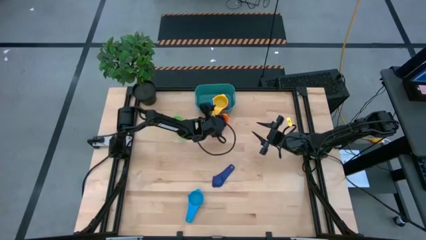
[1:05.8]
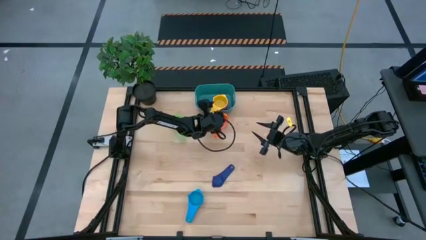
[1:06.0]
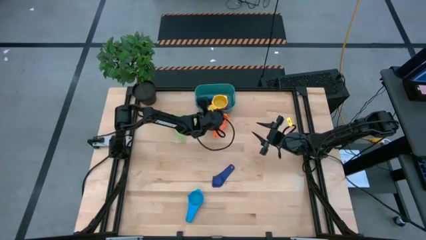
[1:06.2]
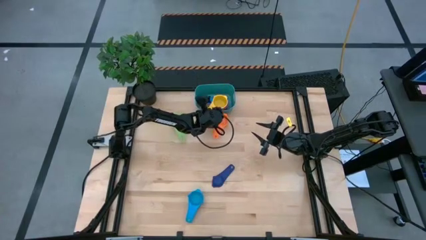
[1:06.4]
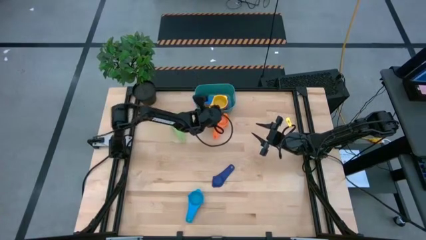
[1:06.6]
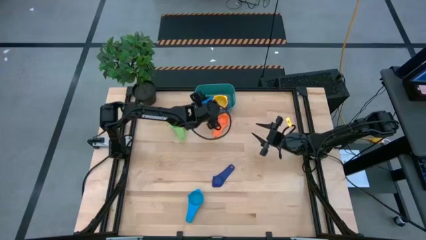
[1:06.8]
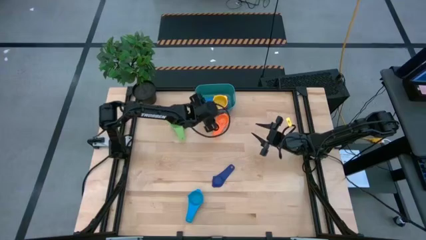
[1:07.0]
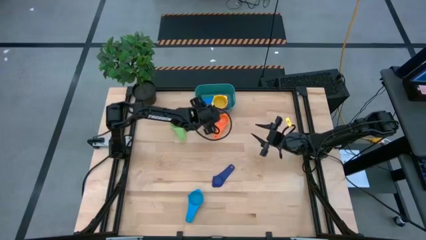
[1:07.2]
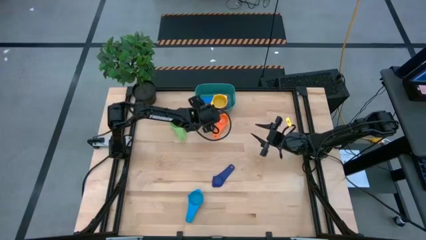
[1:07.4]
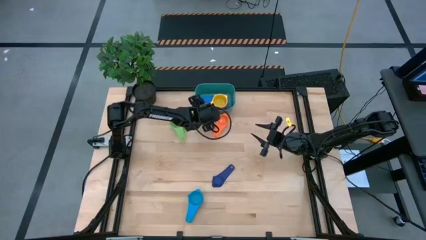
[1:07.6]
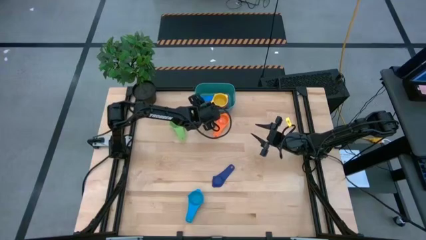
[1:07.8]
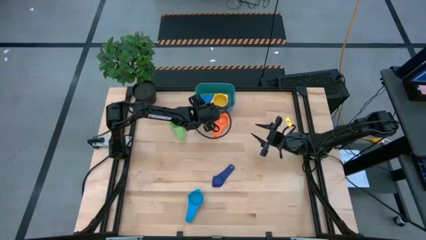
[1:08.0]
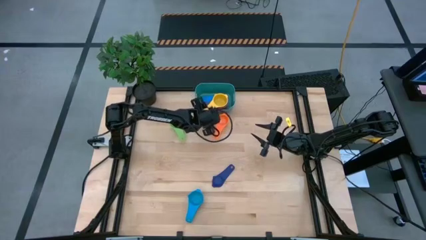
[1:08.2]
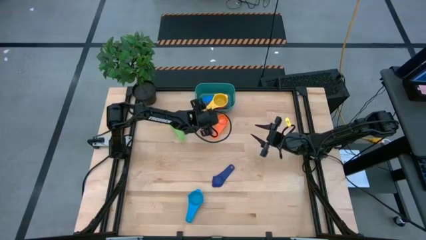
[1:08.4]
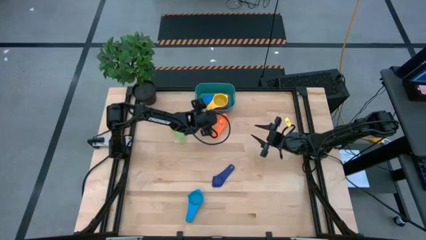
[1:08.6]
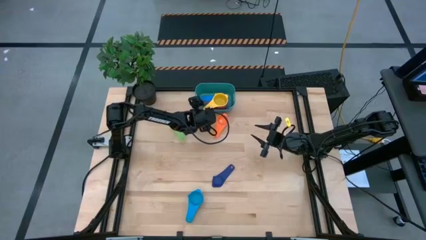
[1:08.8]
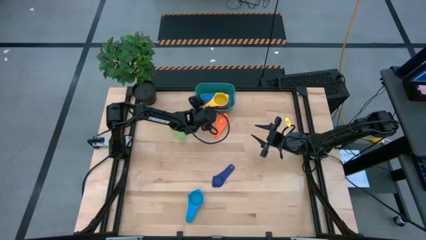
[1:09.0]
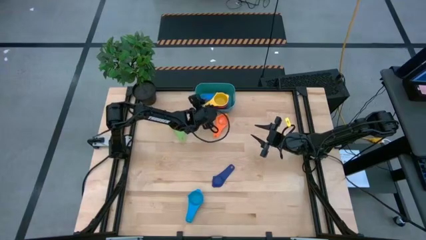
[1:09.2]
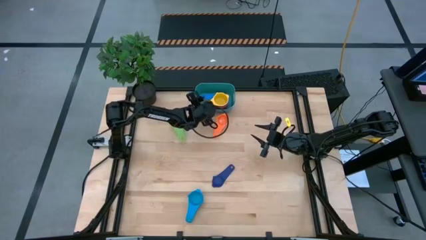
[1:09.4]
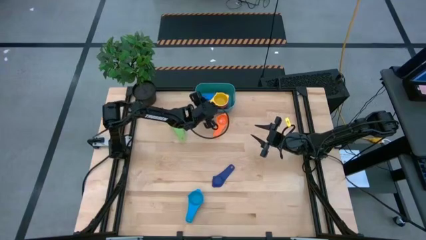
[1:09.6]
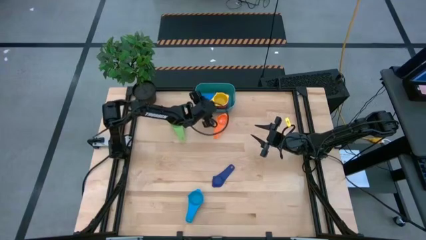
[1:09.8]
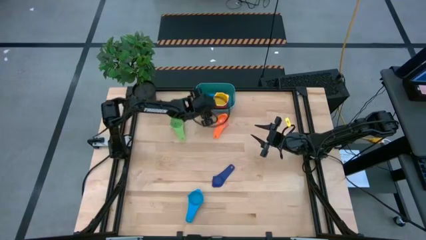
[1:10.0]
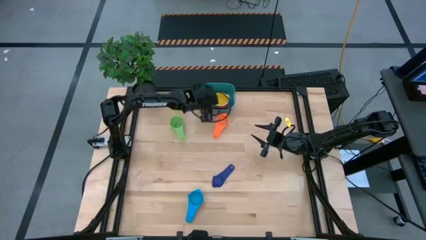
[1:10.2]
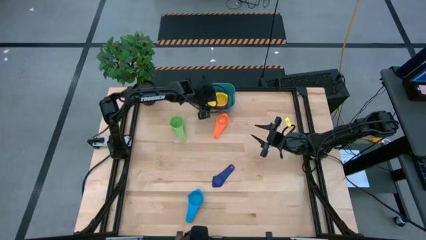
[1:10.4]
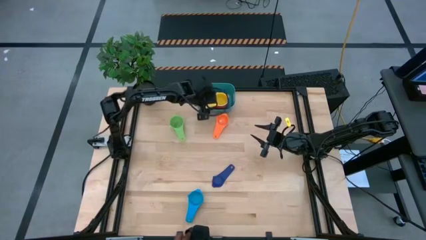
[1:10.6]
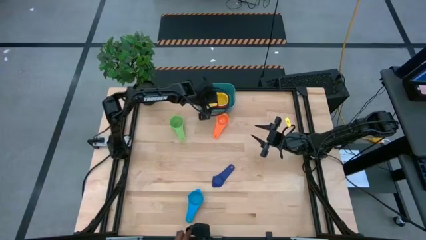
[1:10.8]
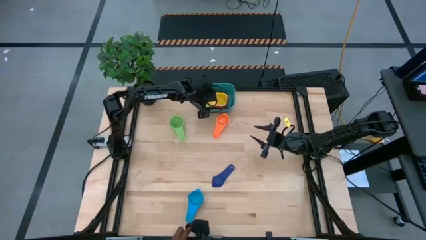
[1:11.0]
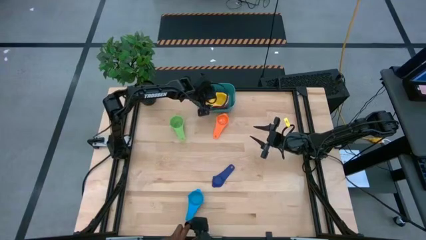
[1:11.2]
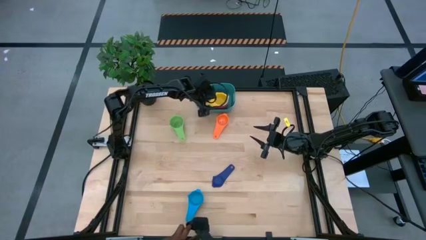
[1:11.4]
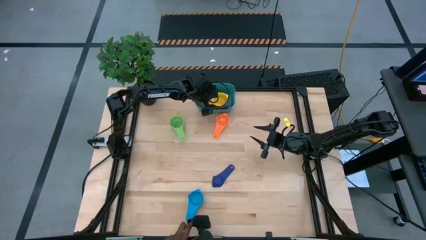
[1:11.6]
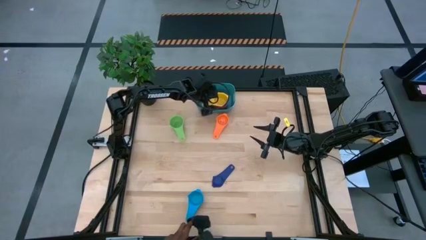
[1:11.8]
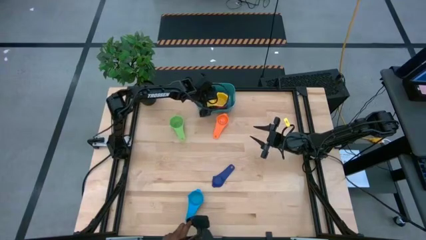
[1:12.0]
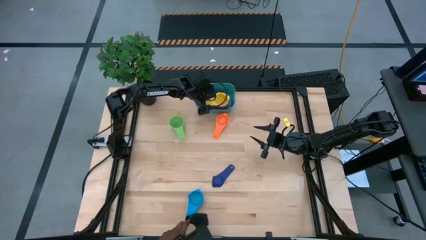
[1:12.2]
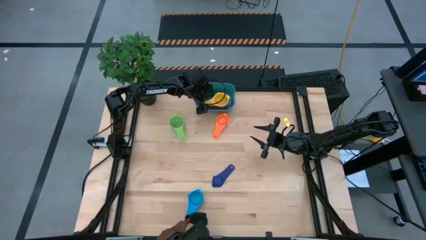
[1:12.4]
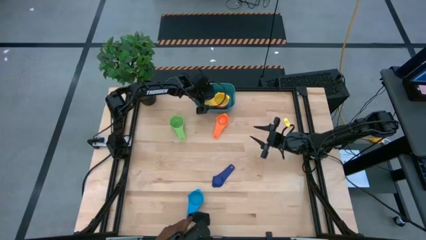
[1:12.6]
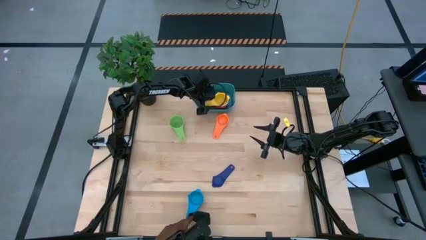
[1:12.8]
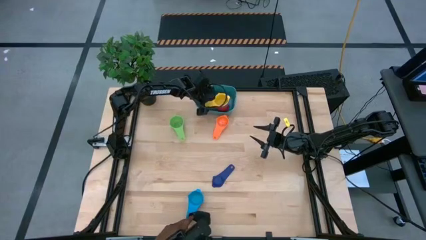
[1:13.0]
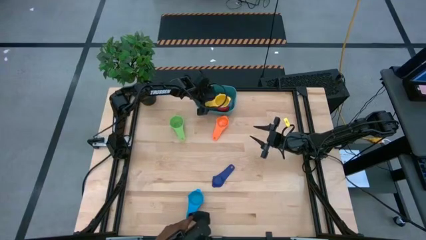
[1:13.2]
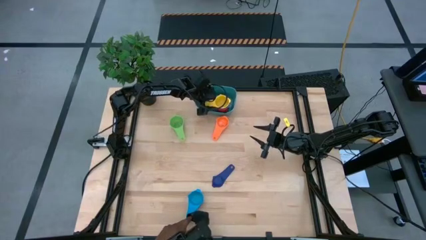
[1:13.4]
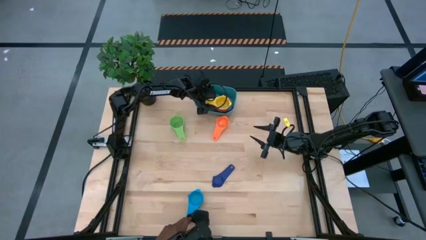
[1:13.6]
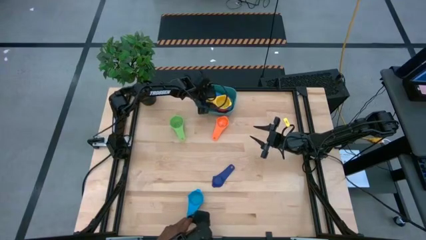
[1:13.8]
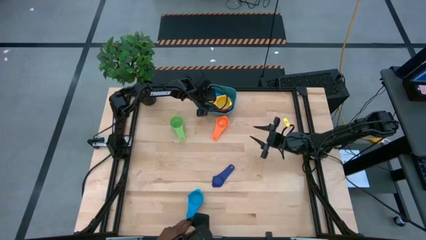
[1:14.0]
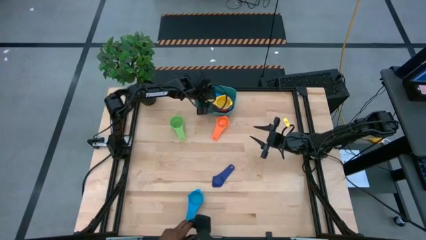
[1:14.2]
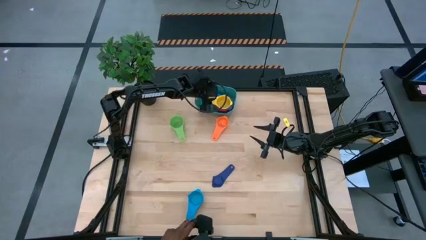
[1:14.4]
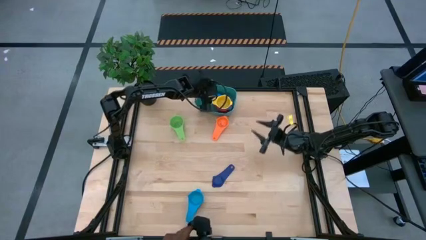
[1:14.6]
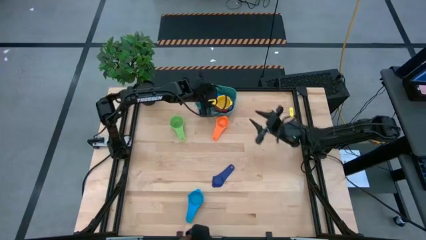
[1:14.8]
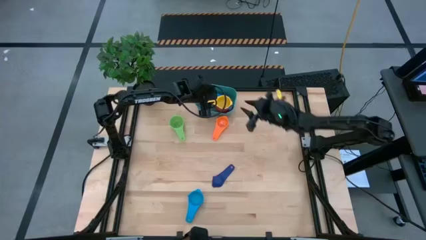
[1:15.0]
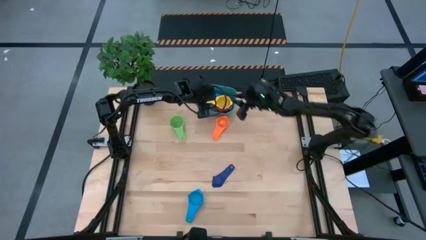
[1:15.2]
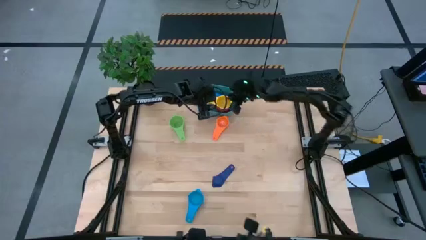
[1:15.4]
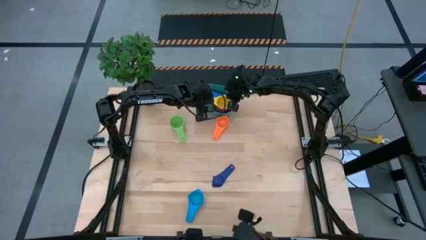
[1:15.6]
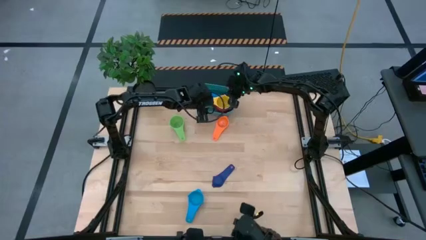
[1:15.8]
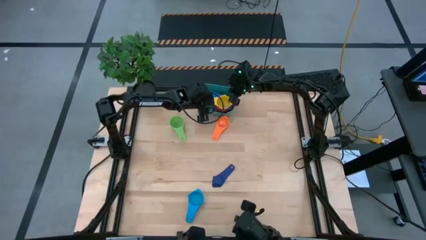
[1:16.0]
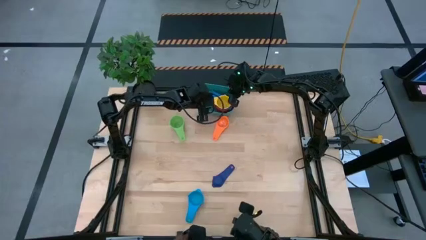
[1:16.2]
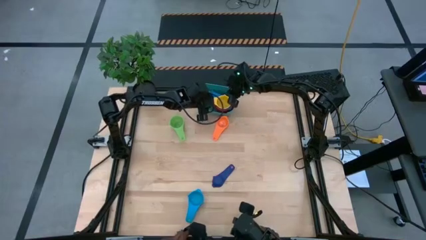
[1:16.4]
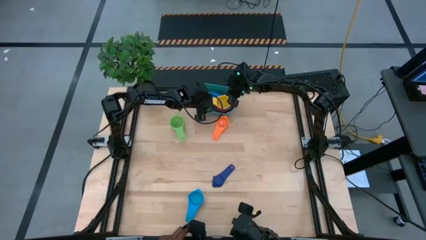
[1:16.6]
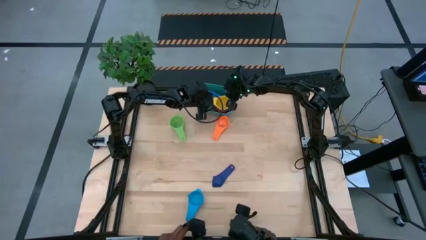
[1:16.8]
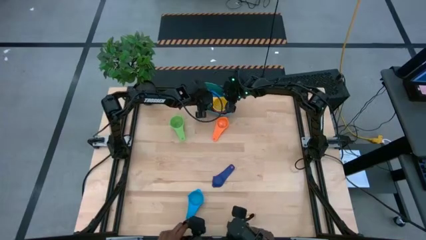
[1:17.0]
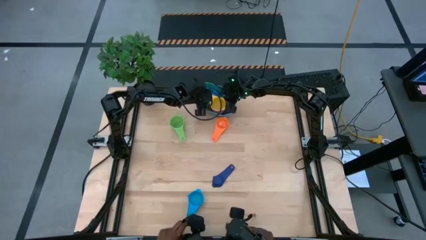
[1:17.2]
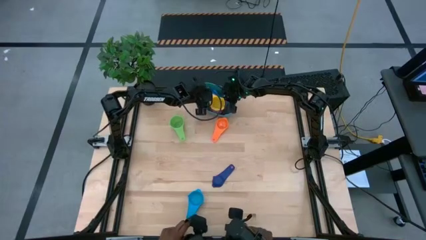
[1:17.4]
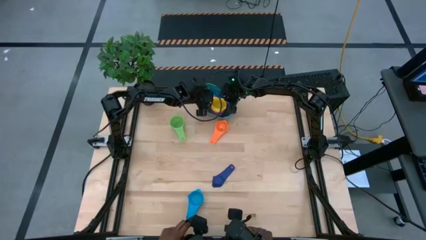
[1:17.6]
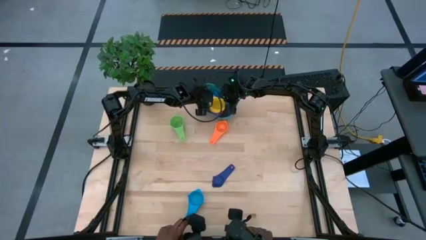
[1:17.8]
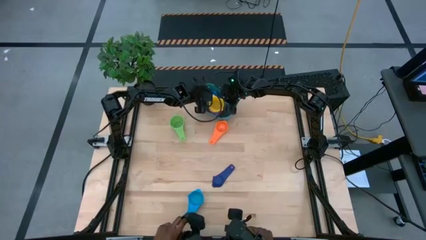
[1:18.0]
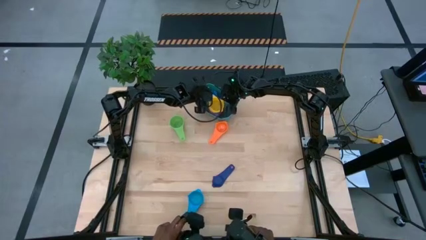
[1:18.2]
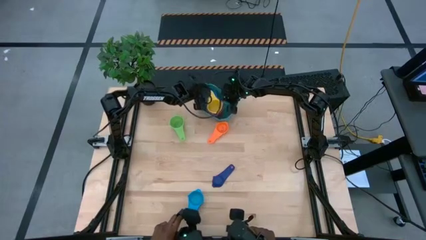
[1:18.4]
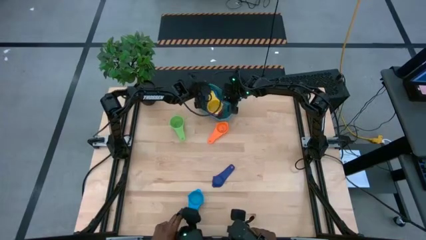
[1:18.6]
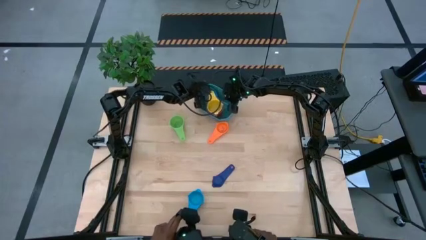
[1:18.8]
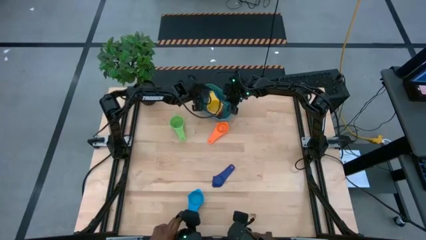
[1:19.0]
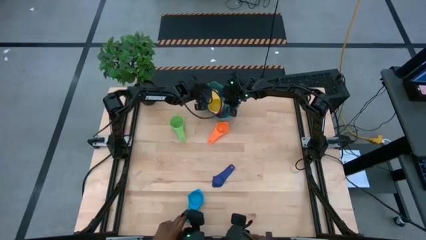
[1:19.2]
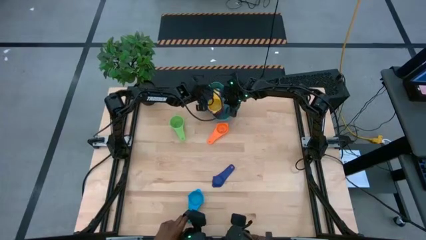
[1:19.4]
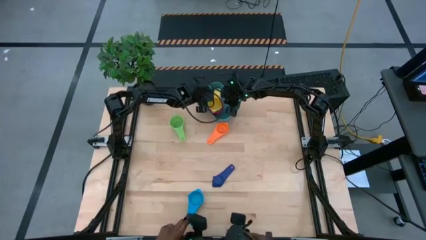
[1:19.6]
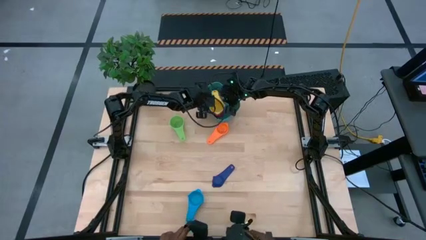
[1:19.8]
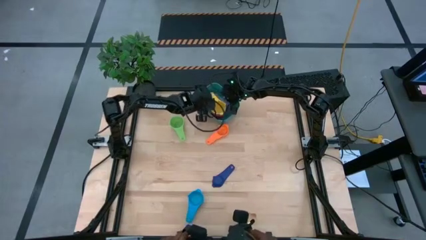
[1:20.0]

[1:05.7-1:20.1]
Task: Nest measuring cups in basket
Stack the yellow measuring cup on top of the blue measuring cup in the blue bin
